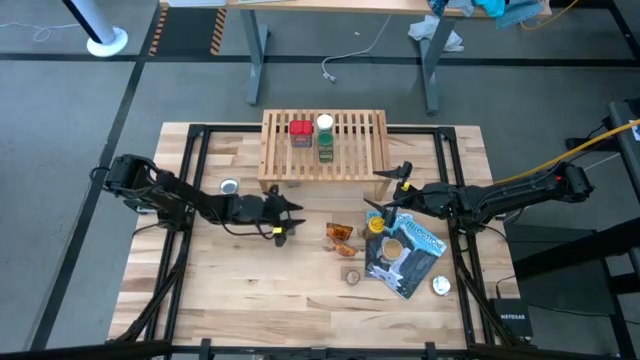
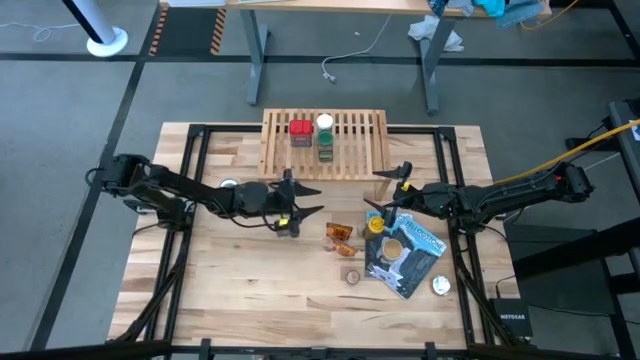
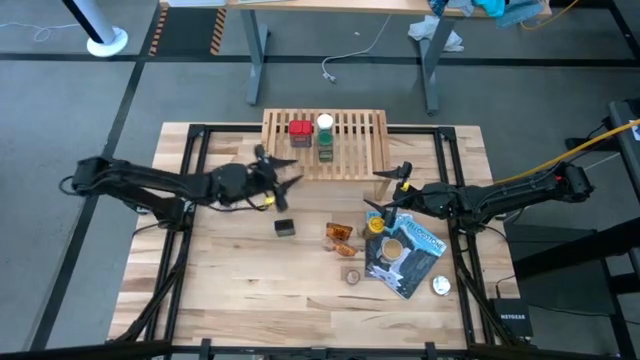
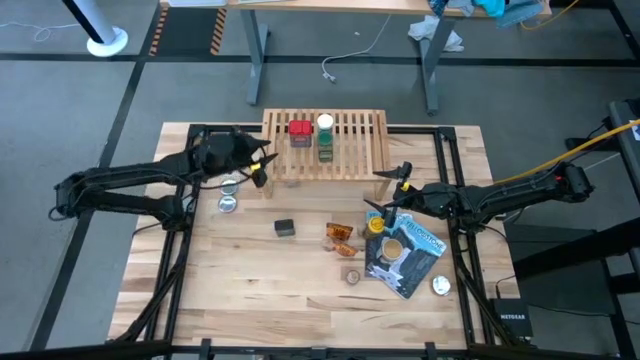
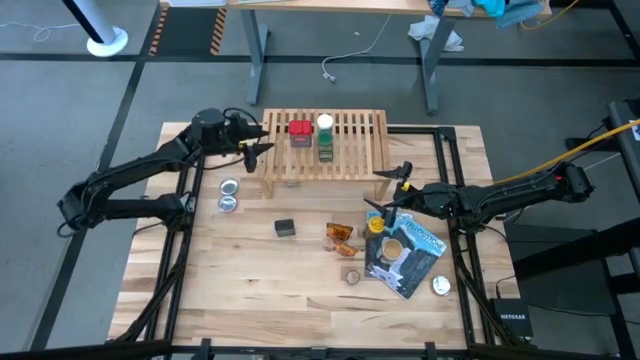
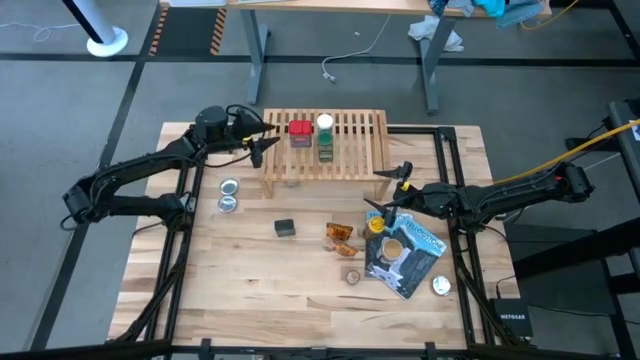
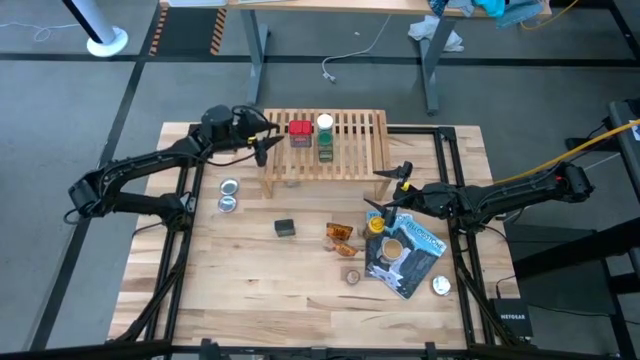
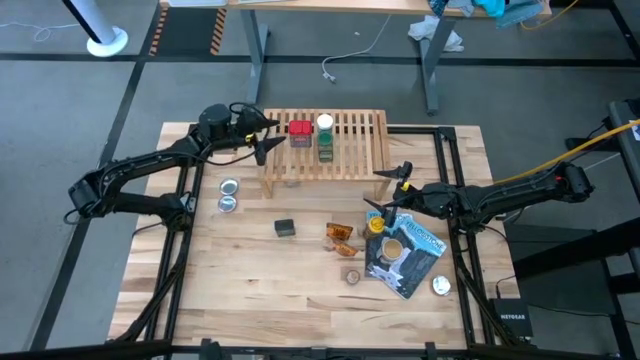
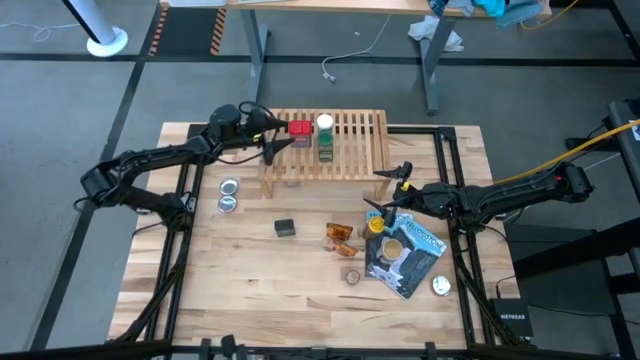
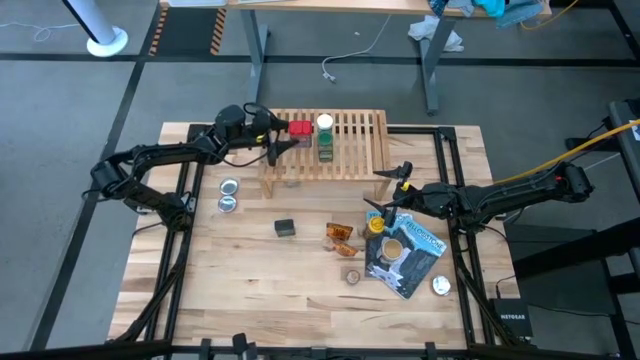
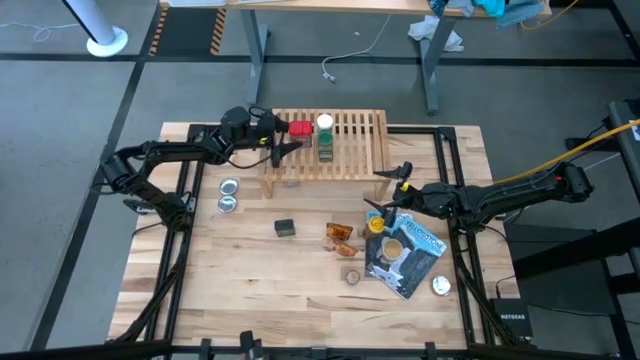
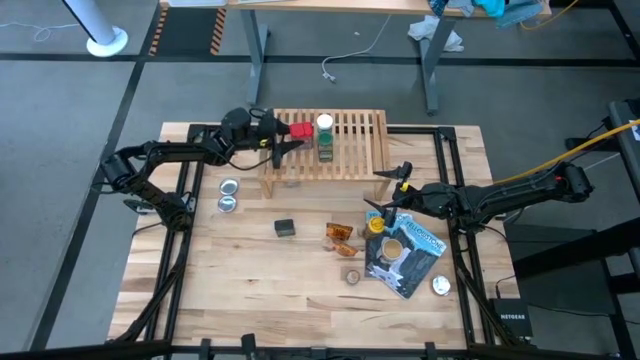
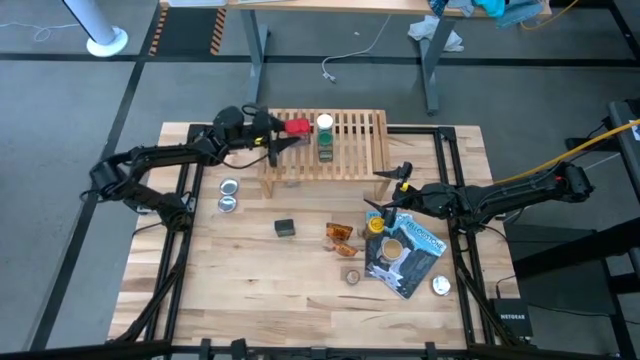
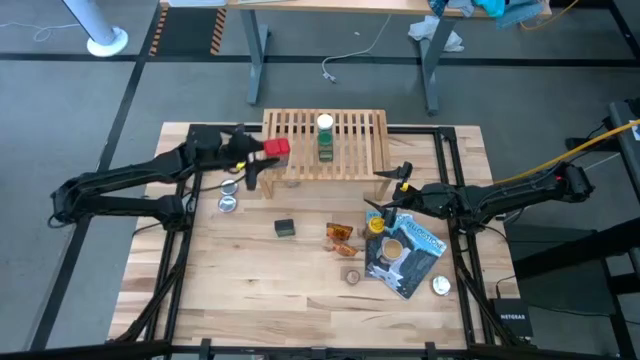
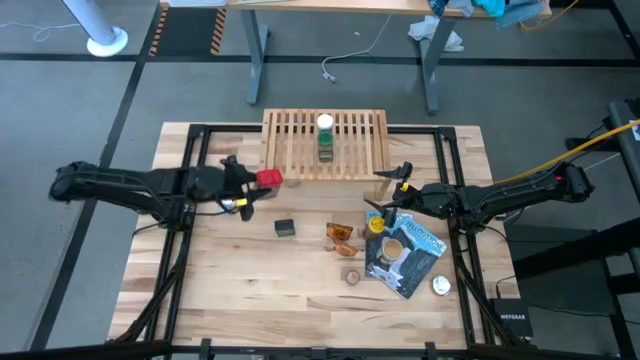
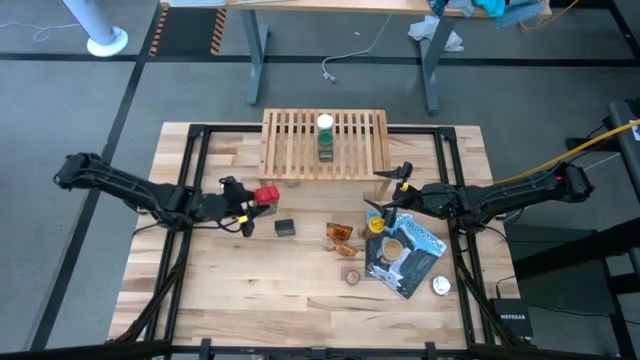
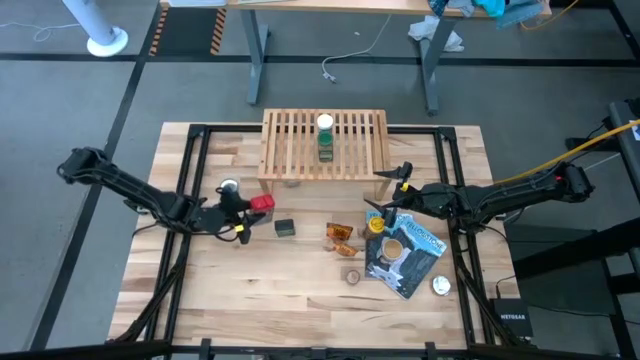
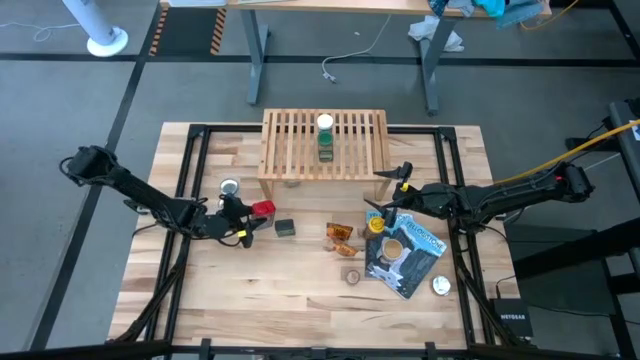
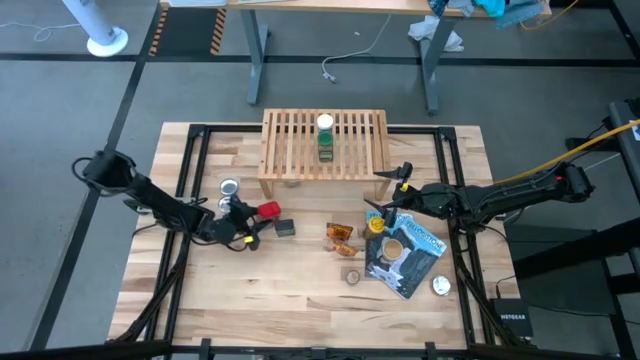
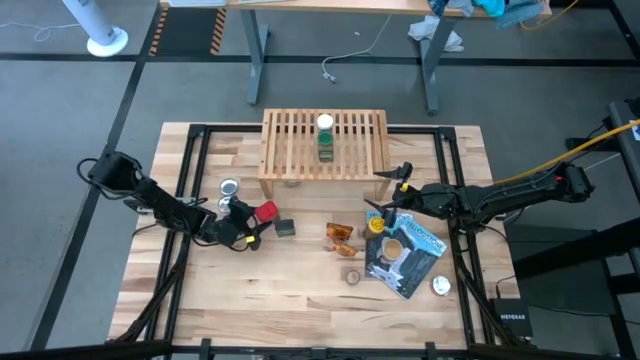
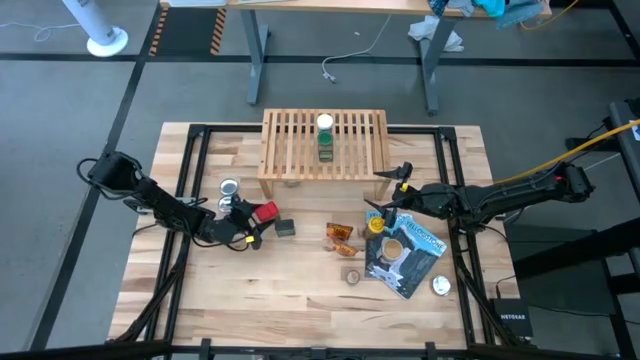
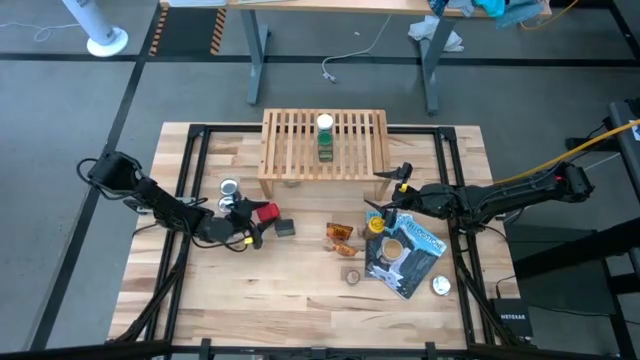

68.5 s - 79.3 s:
Task: Shelf spices
Remove the red seasoning can from the shelf

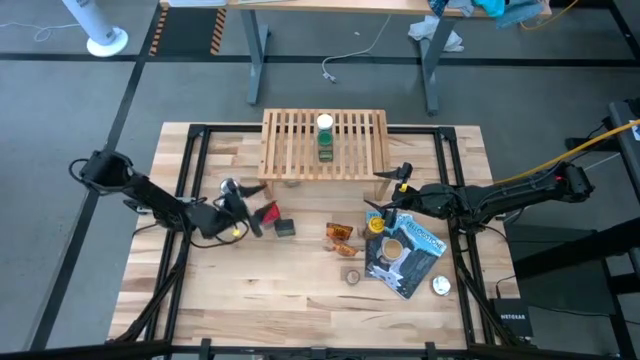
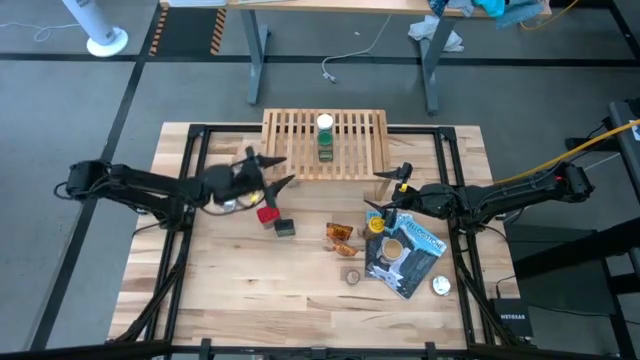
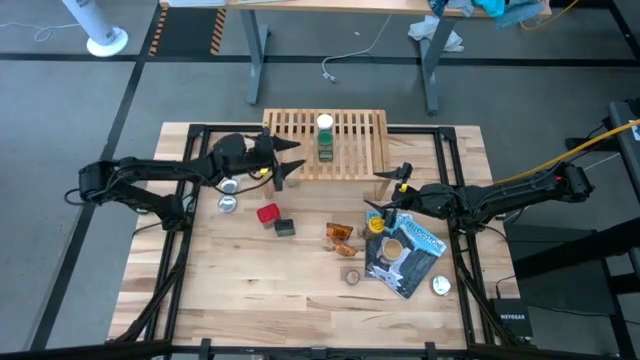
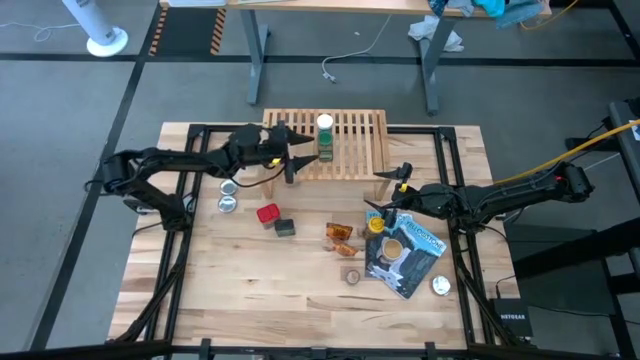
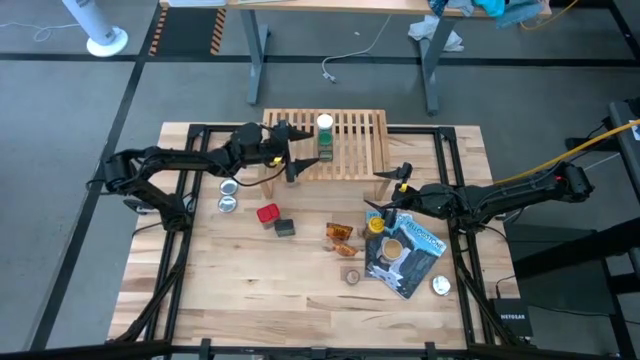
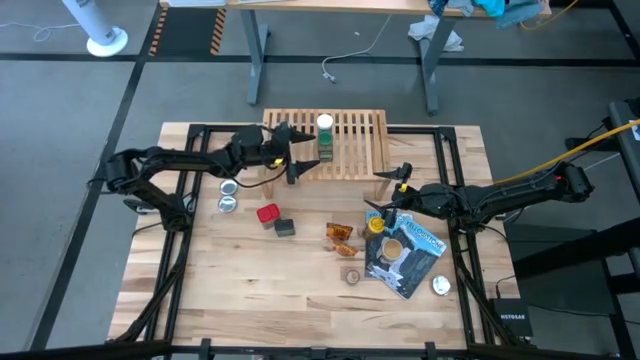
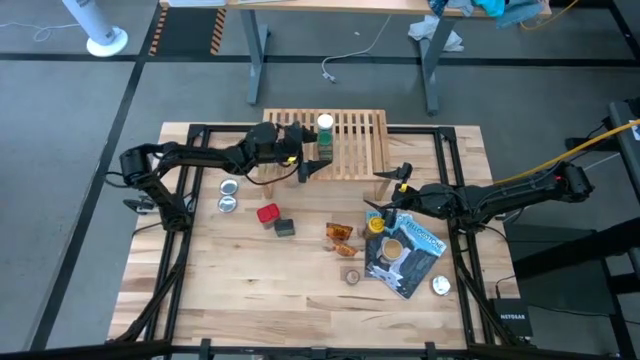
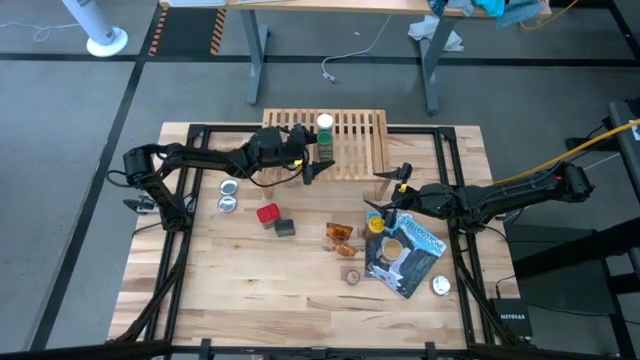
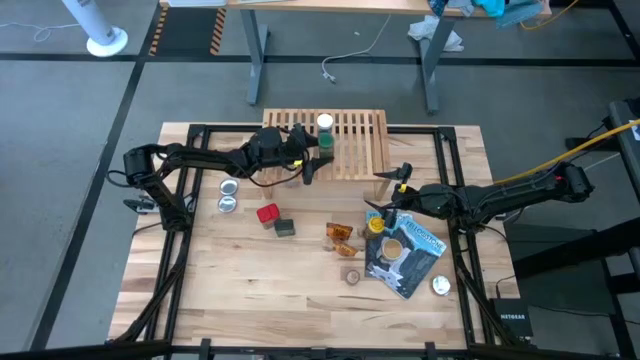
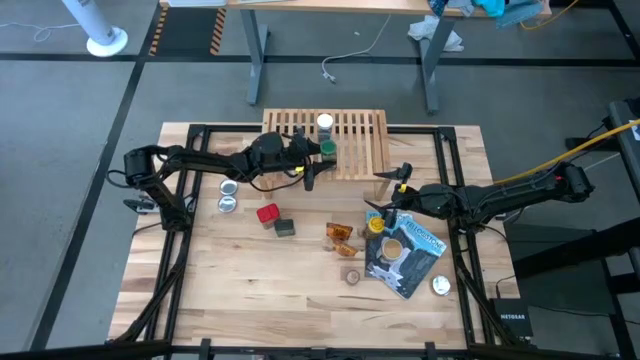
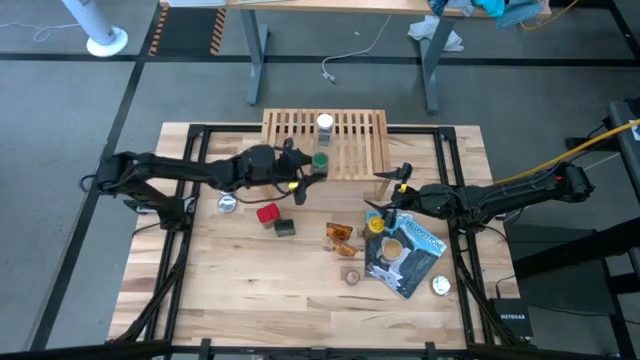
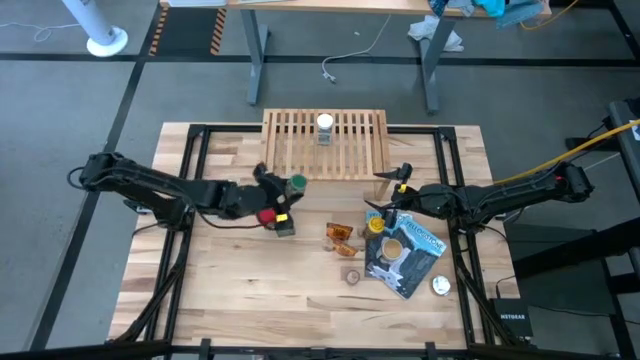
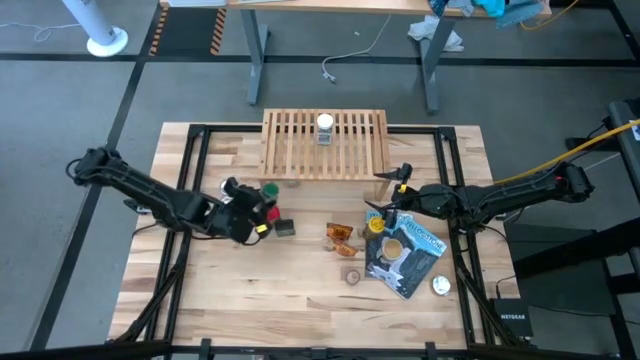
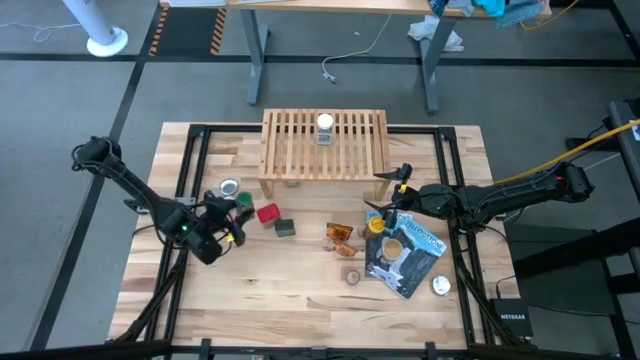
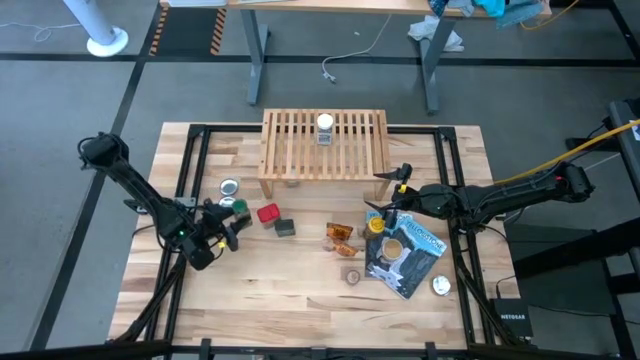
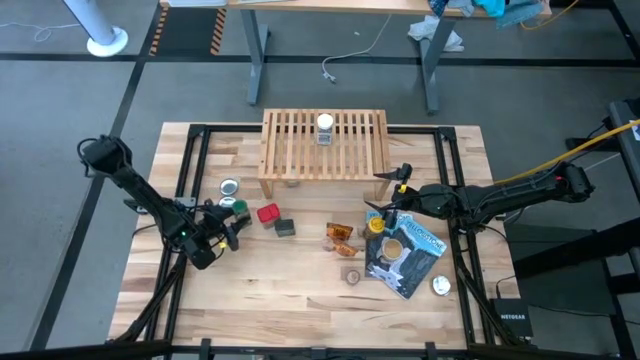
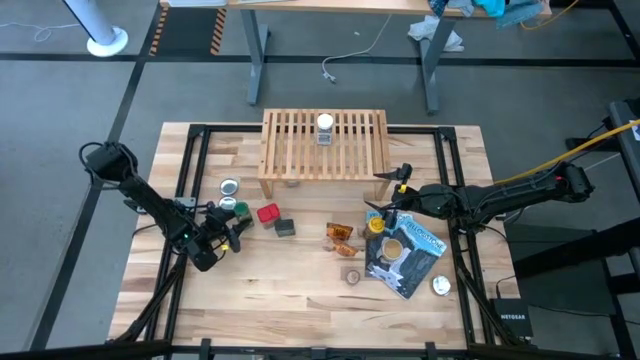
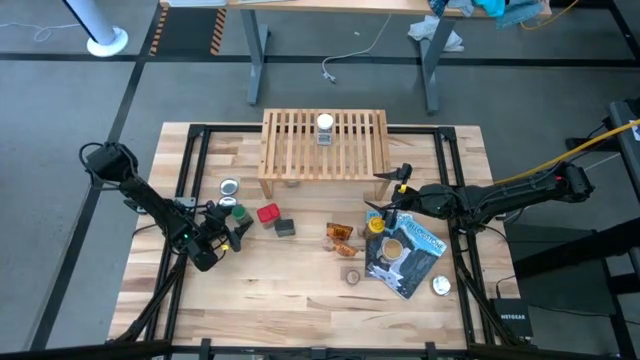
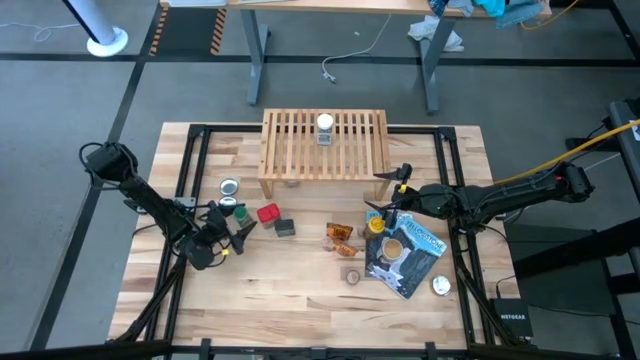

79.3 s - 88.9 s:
Remove the green seasoning bottle from the shelf
